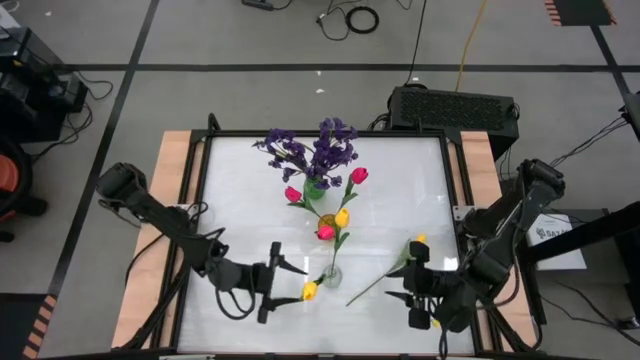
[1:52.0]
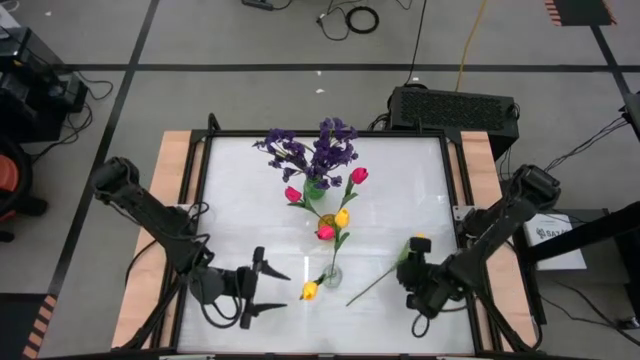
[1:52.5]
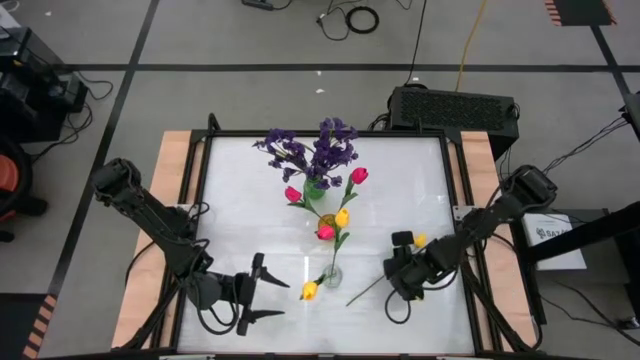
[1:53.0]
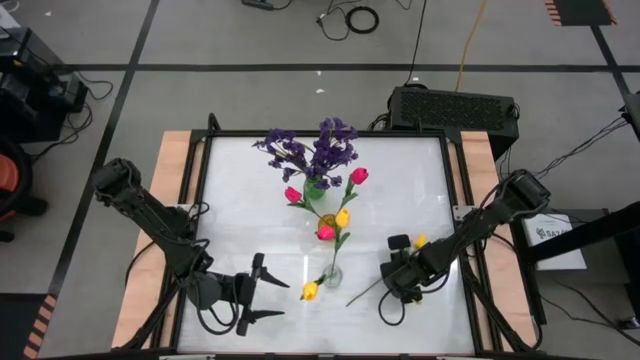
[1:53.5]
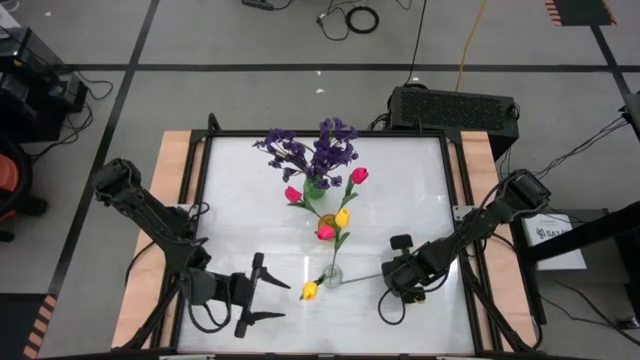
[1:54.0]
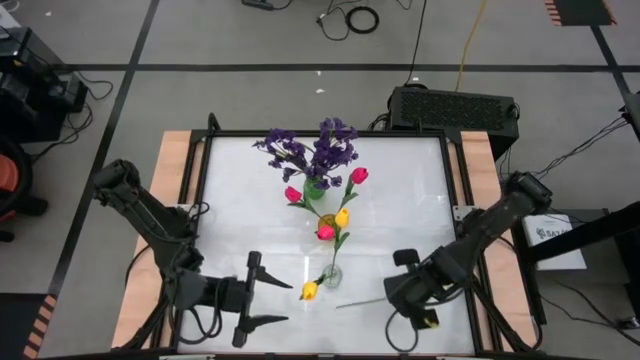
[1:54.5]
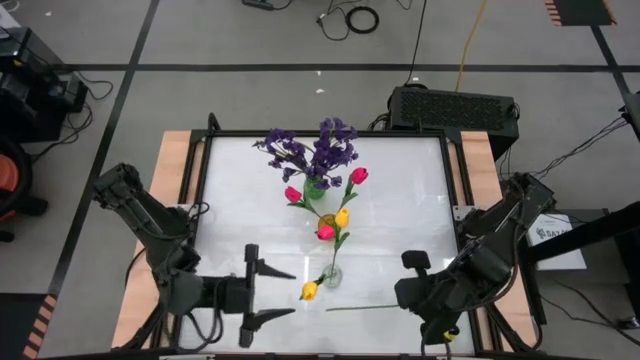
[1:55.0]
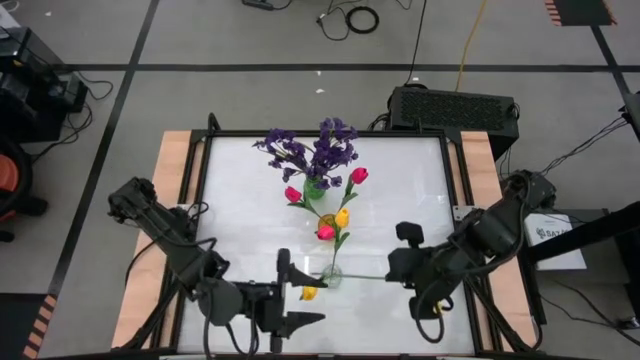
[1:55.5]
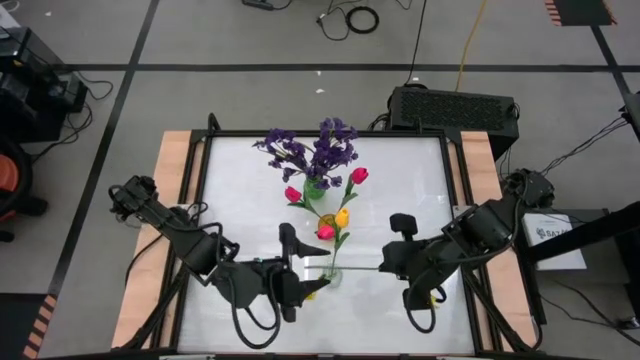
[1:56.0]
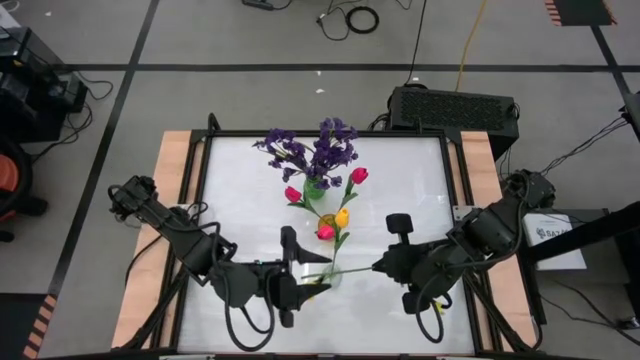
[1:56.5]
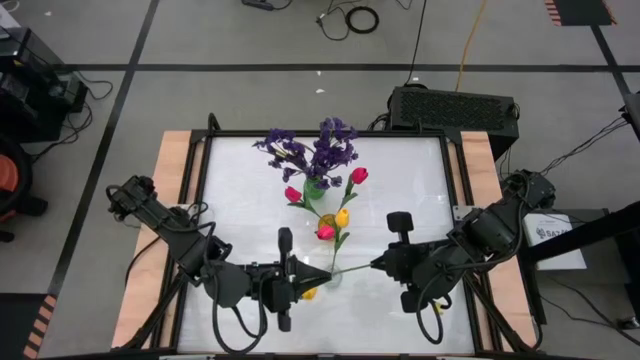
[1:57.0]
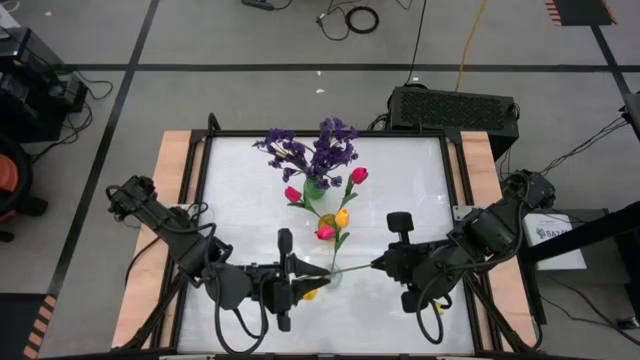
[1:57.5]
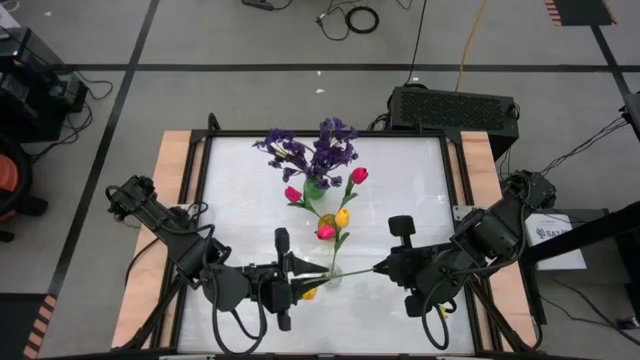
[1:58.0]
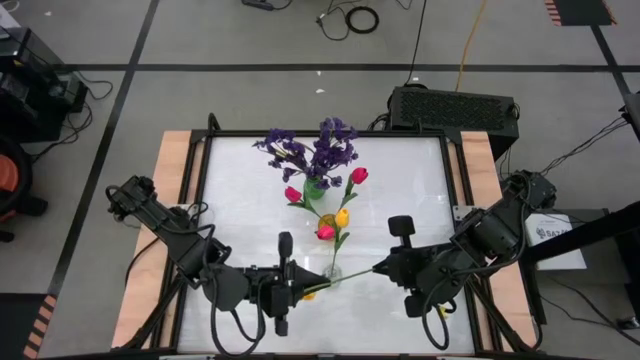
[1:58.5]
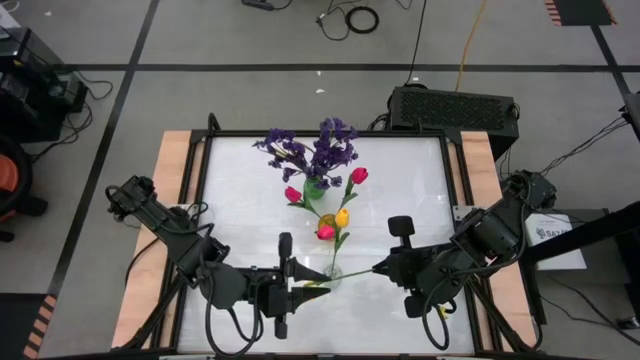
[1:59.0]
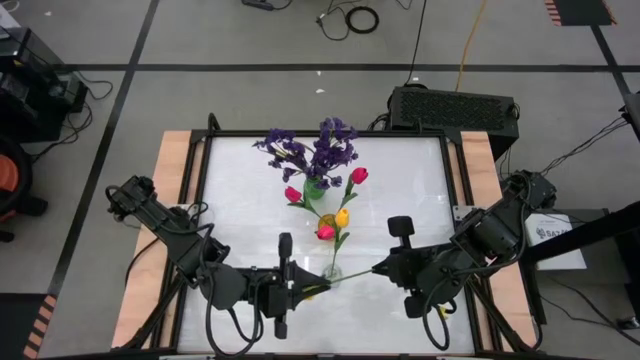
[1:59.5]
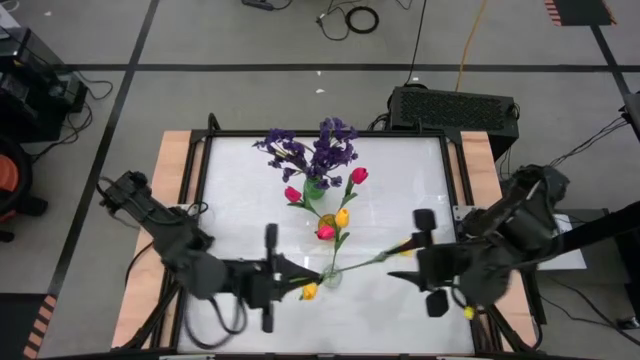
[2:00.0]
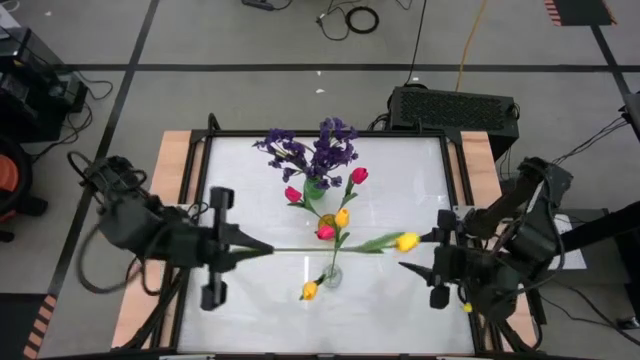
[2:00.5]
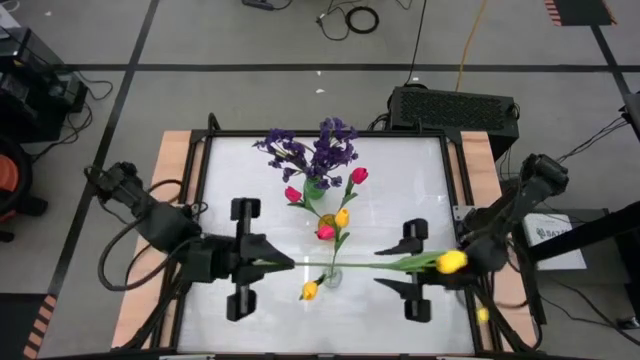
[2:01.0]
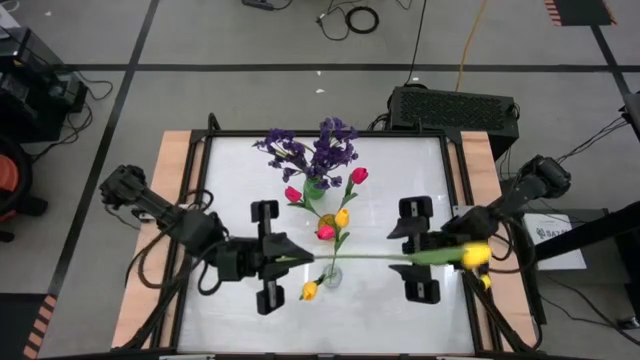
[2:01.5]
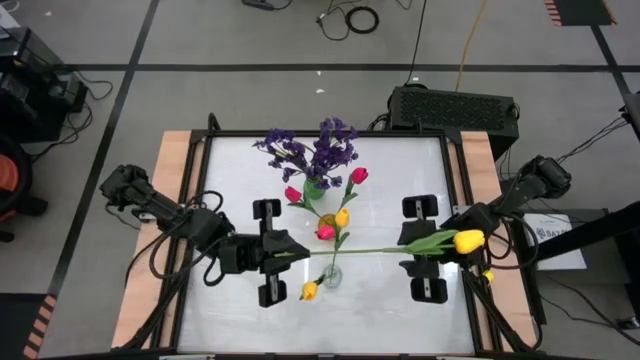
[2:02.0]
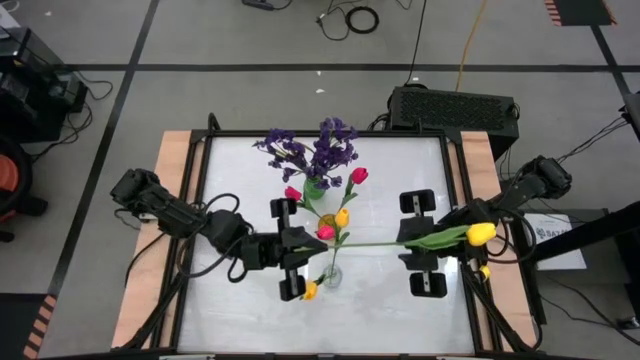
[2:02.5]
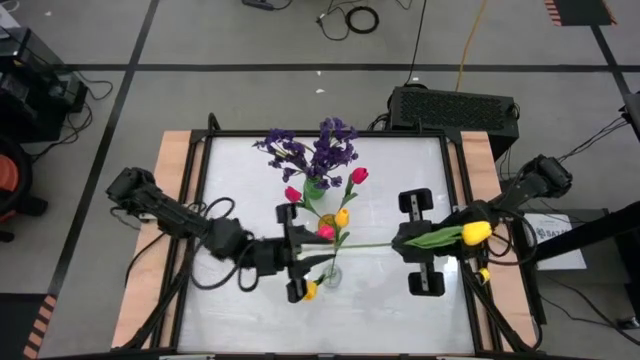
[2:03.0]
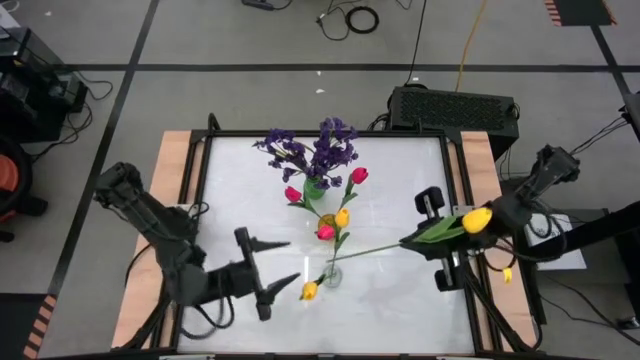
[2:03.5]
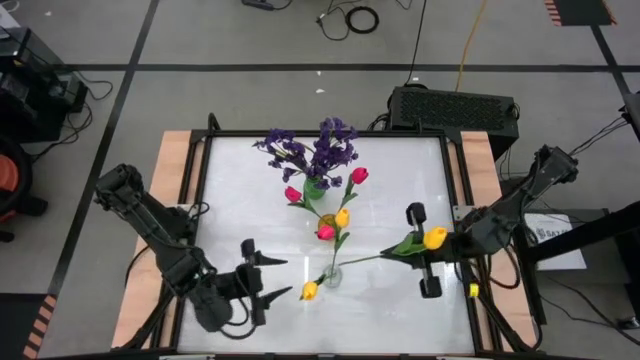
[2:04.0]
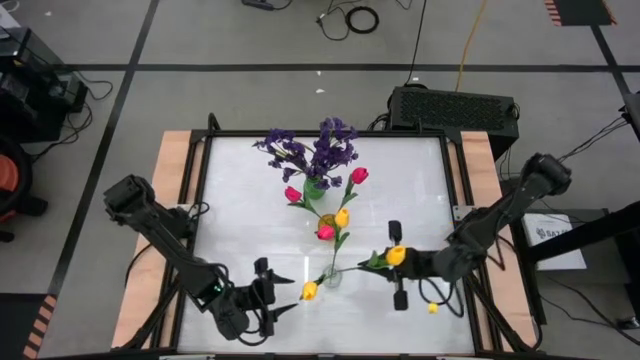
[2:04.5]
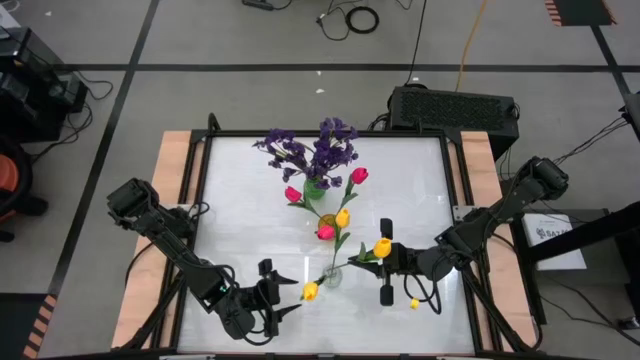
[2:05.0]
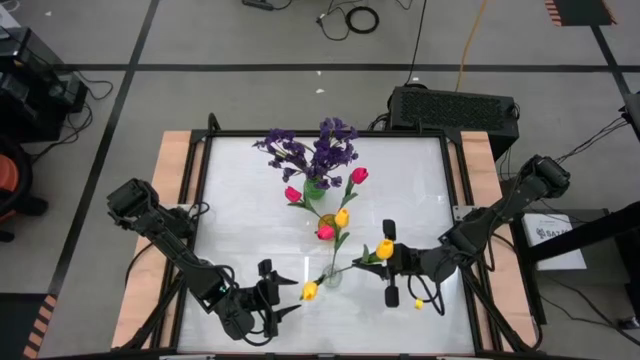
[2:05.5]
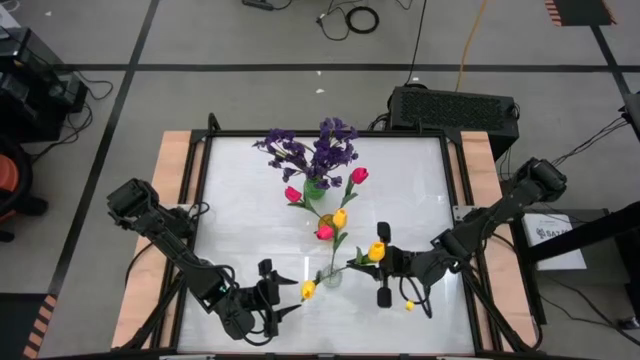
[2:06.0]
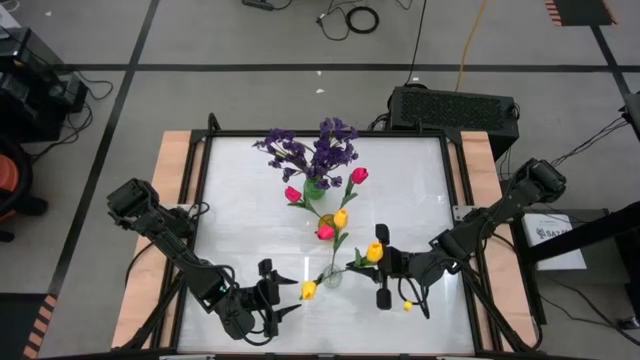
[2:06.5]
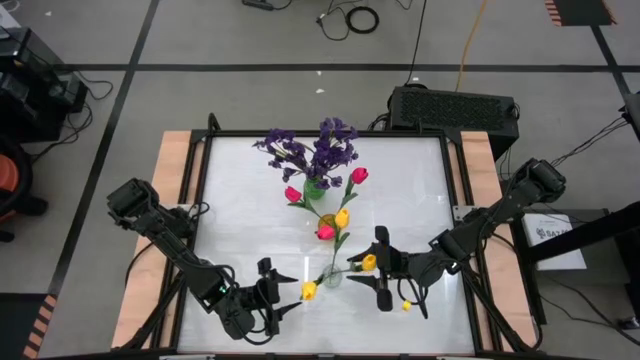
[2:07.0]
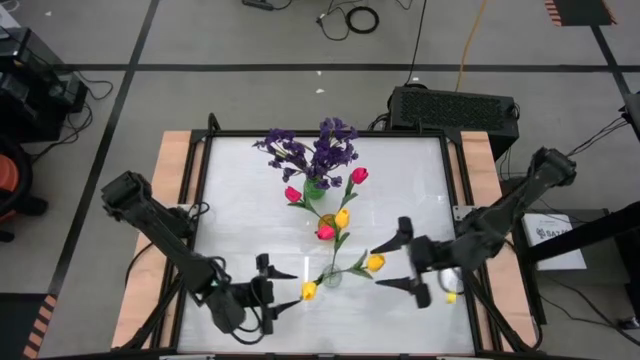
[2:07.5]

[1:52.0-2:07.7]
Task: Sort flowers into vase by color
Put the yellow flower into the transparent vase

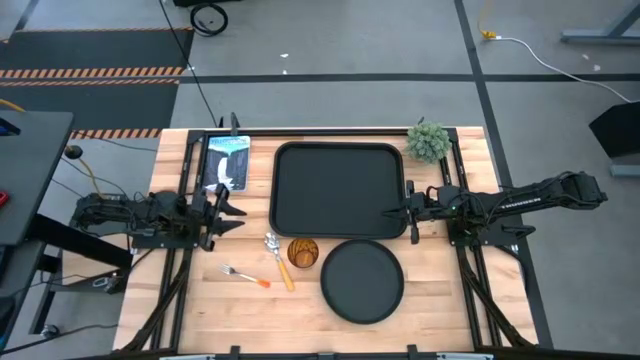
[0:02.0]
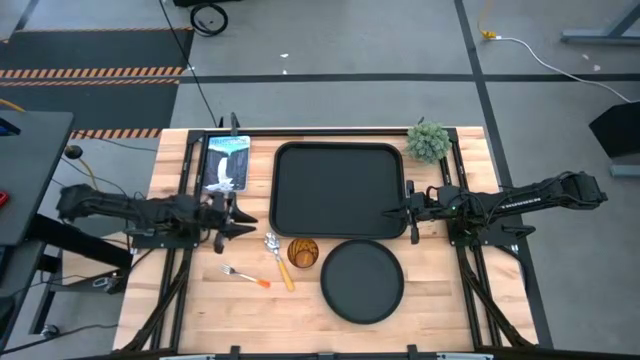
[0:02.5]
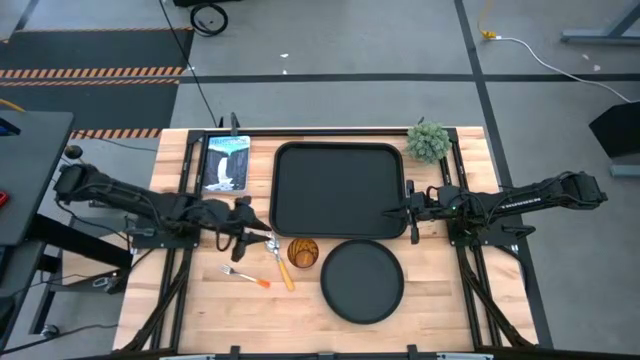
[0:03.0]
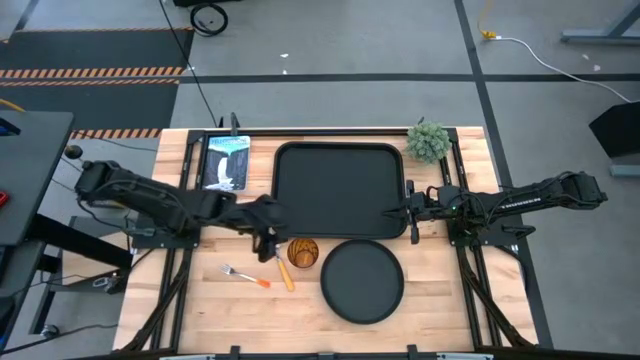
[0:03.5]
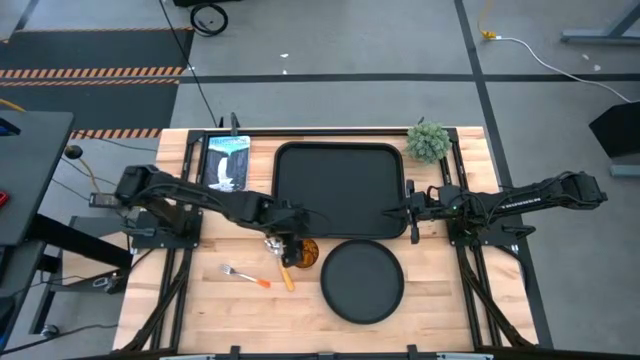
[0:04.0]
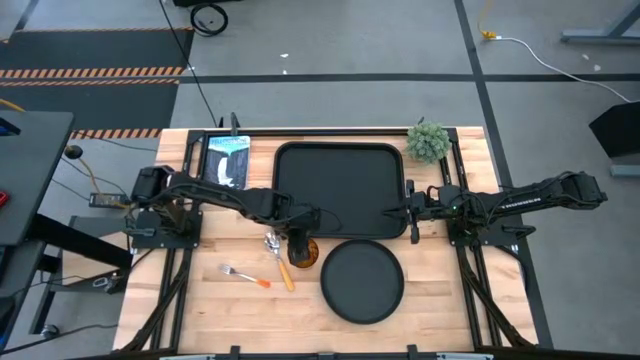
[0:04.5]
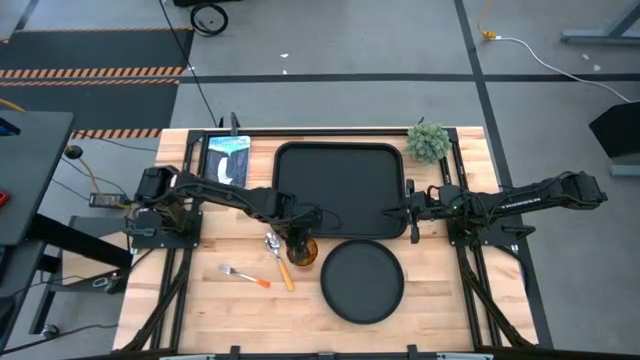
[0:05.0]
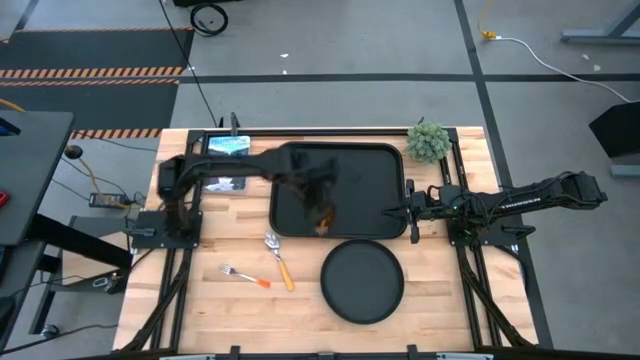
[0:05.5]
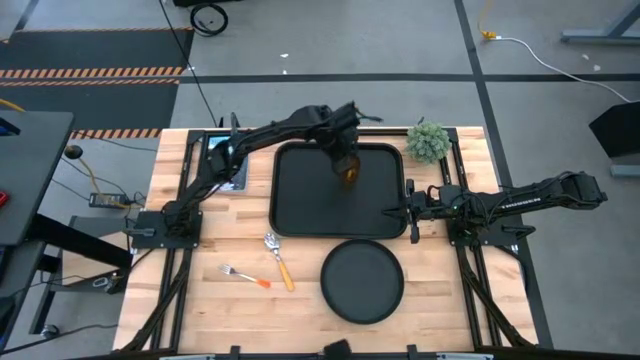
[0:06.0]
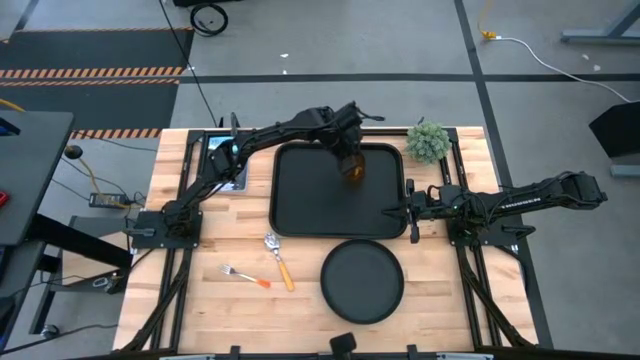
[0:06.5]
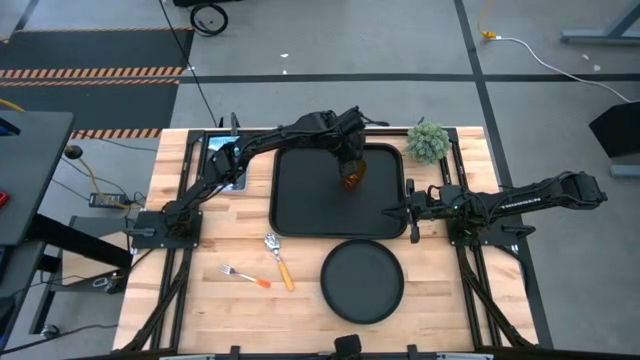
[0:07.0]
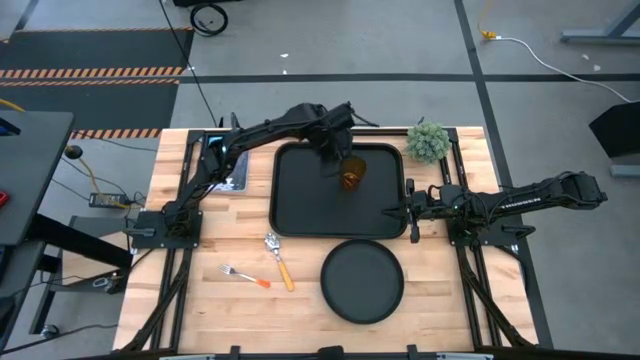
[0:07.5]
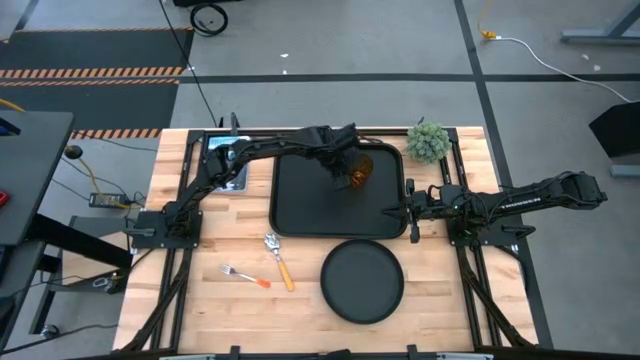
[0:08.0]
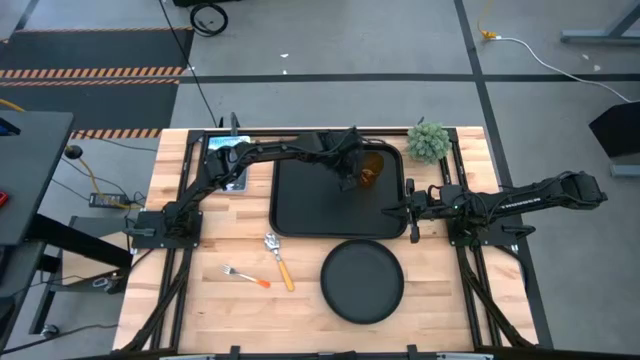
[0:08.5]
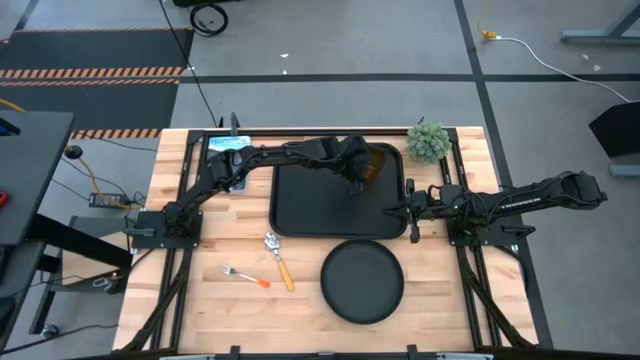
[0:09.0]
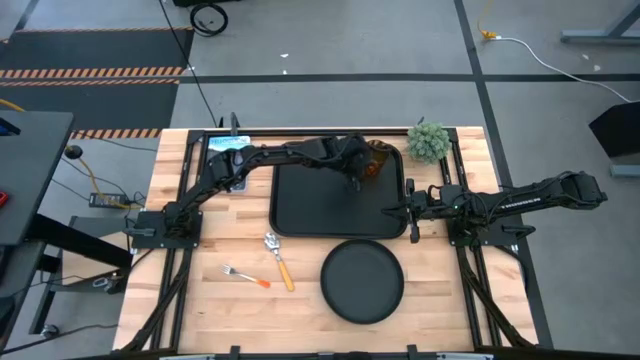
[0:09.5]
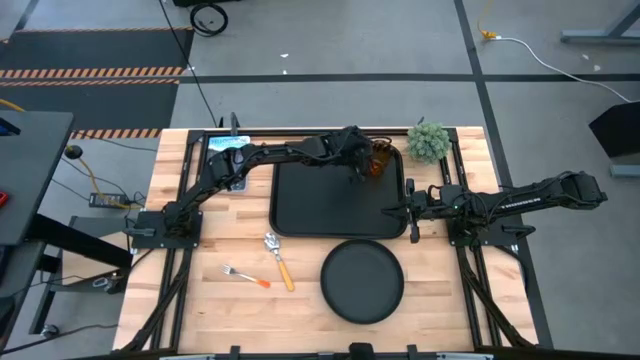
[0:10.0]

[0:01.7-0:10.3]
Task: Pick and place plate/cup/fork/spoon on tray
Put the brown cup on the top right of the black tray
